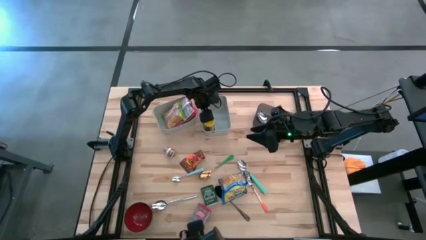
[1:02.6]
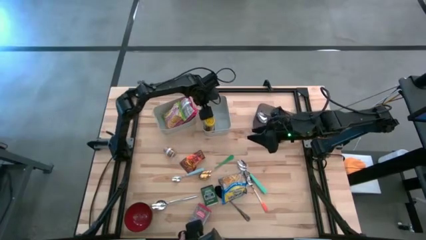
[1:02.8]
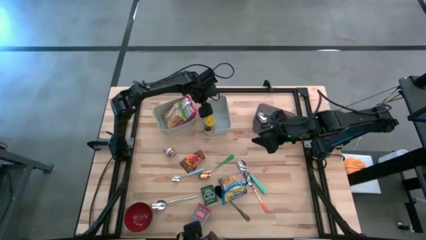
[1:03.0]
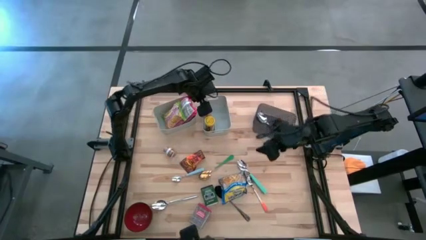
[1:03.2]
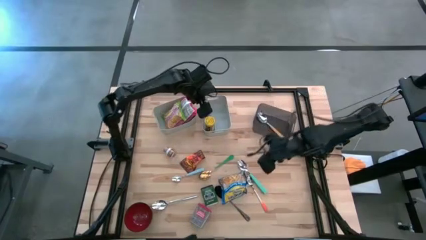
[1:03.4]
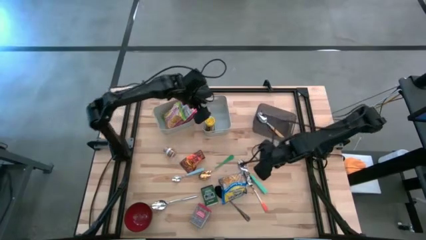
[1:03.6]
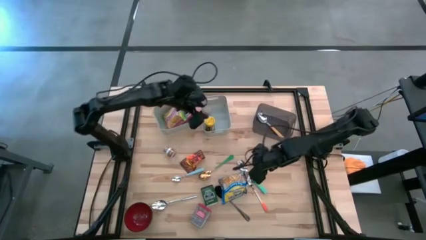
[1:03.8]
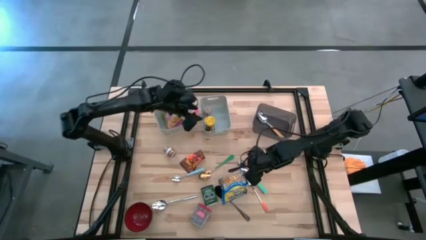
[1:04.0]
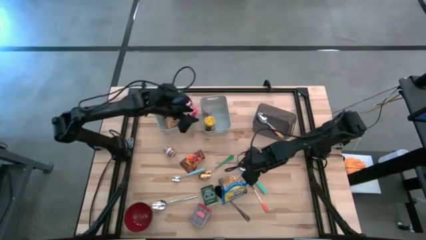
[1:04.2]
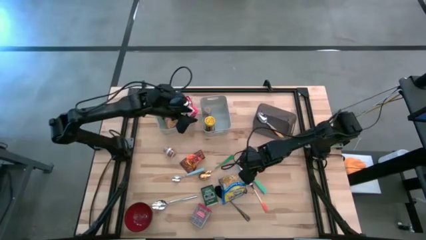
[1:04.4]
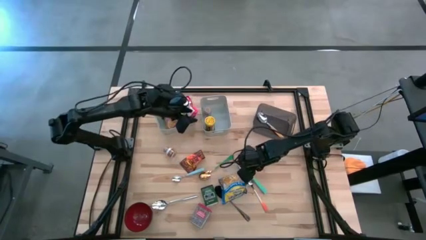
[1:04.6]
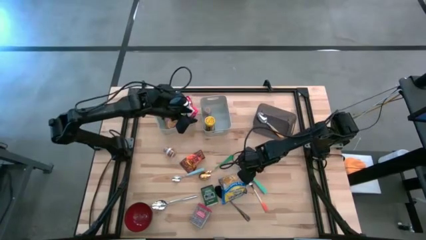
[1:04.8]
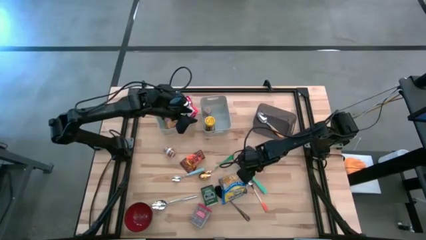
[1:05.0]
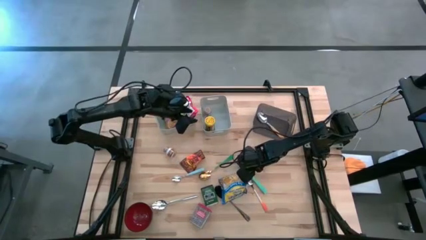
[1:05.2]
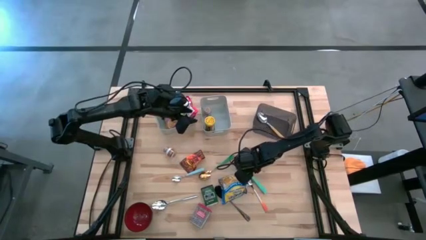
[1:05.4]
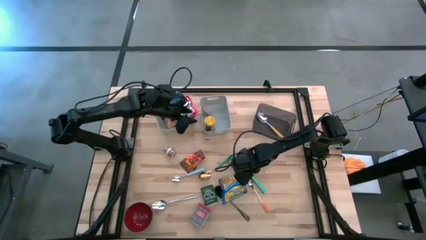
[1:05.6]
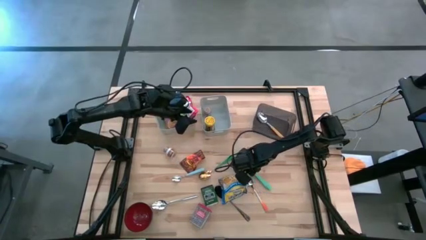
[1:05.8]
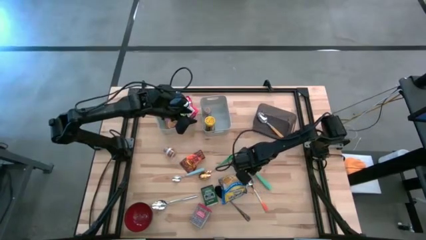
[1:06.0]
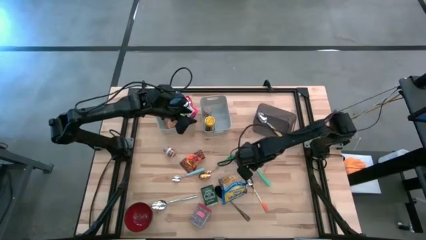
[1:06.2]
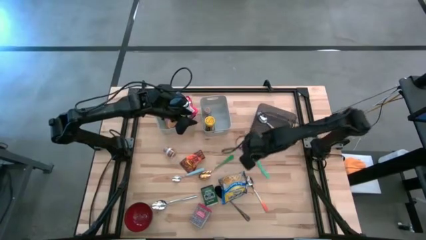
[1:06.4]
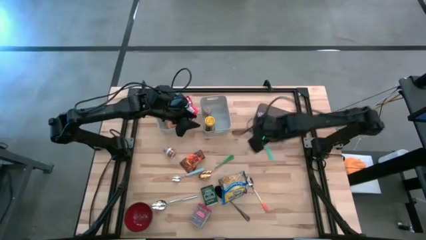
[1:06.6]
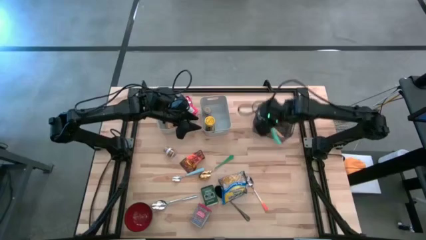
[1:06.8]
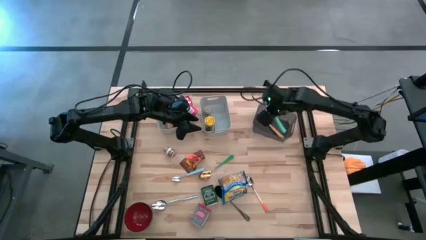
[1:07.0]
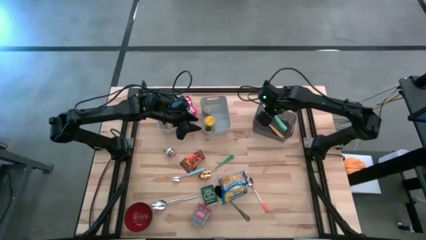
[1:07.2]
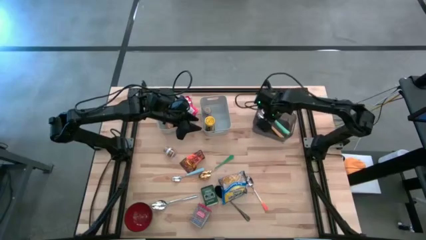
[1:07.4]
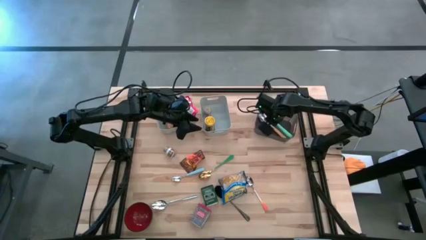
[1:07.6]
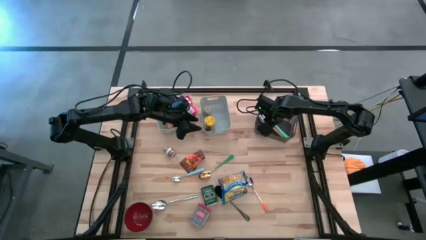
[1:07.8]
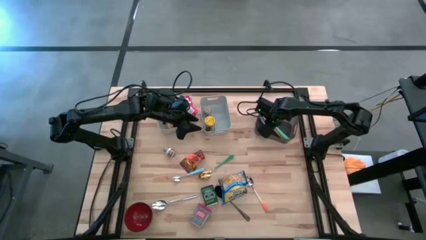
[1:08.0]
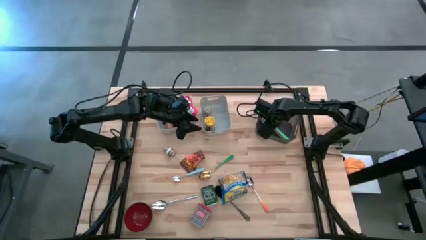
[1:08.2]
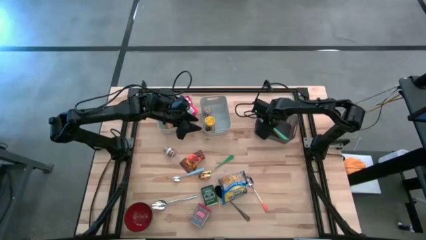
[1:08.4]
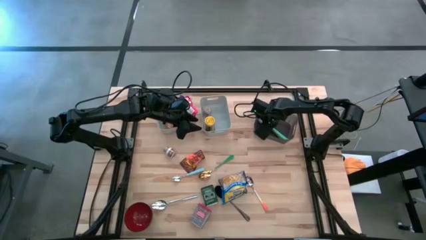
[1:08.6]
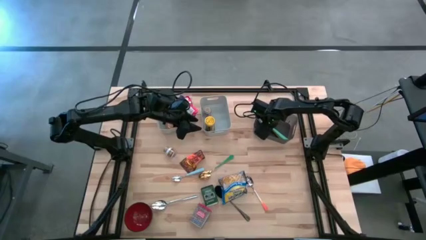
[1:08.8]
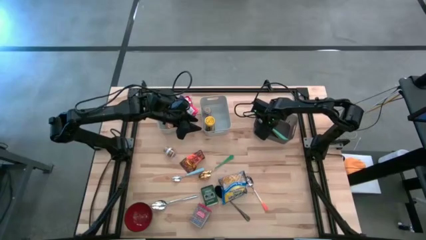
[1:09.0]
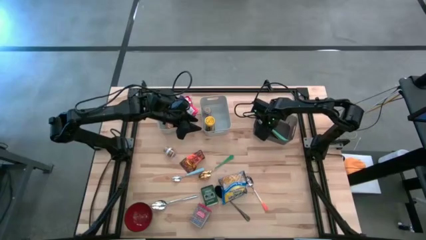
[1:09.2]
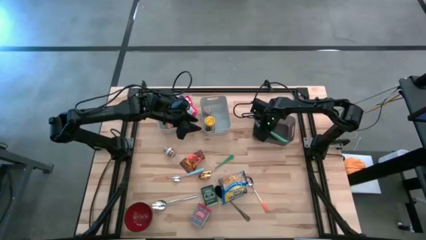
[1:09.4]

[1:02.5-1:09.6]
Put the right light blue spoon into the black bin

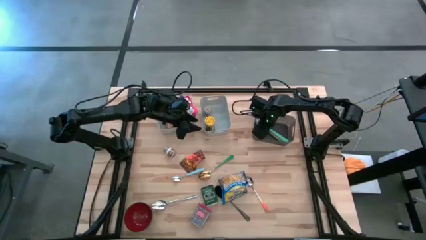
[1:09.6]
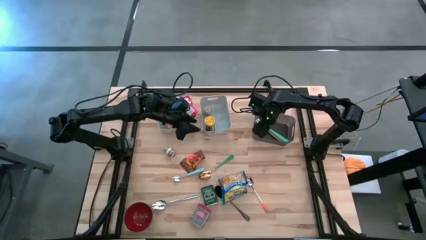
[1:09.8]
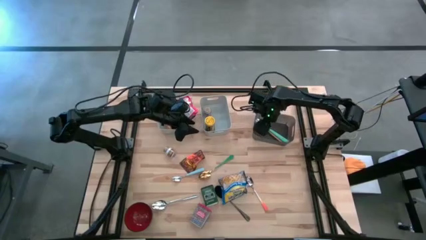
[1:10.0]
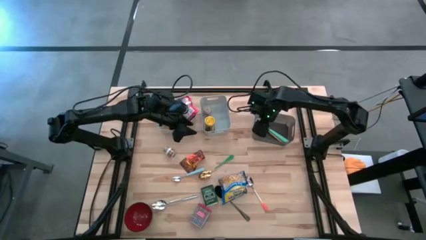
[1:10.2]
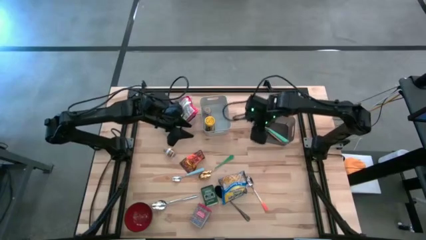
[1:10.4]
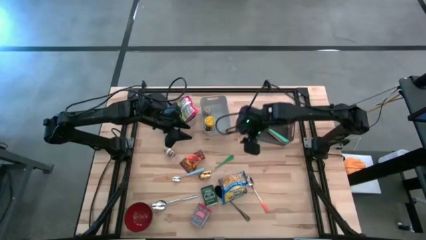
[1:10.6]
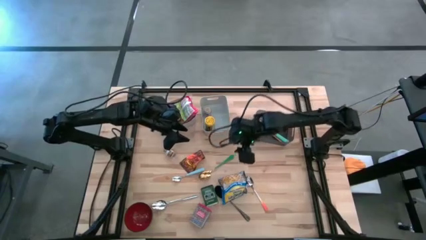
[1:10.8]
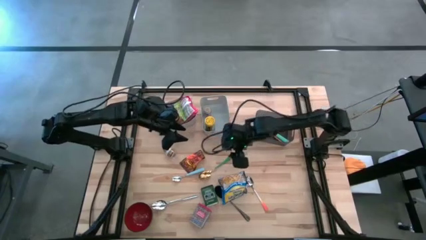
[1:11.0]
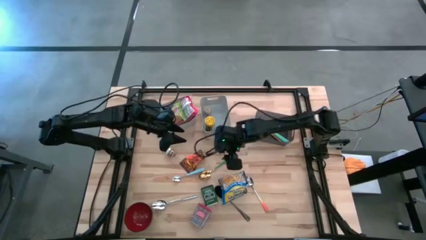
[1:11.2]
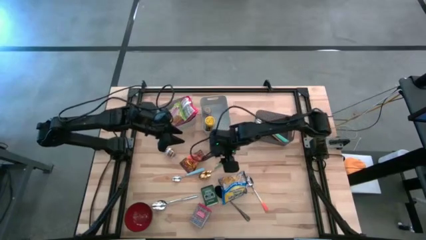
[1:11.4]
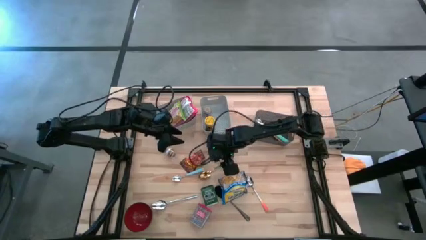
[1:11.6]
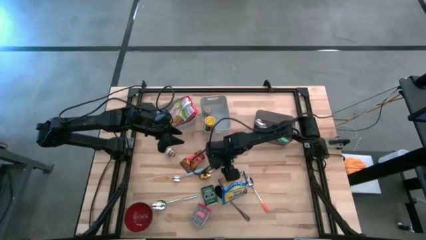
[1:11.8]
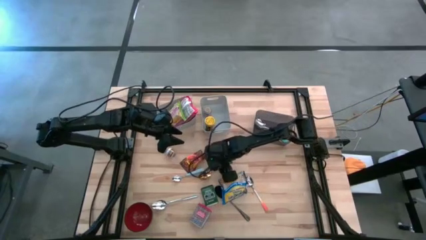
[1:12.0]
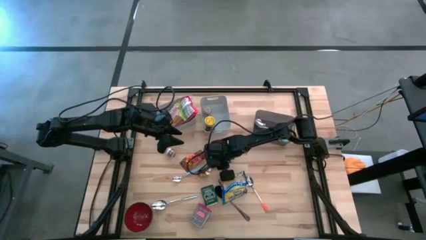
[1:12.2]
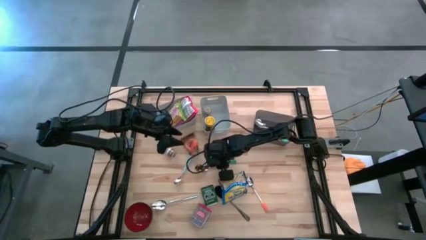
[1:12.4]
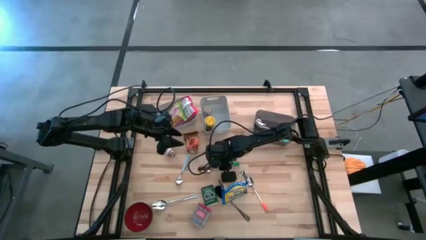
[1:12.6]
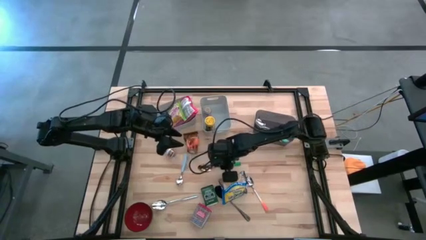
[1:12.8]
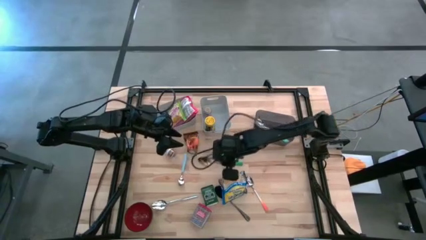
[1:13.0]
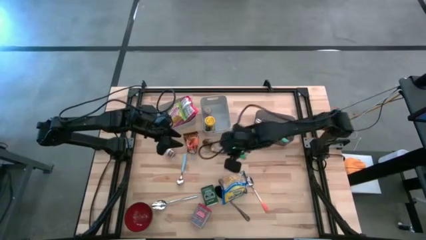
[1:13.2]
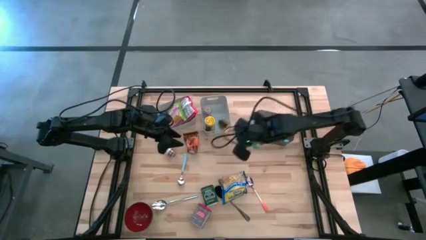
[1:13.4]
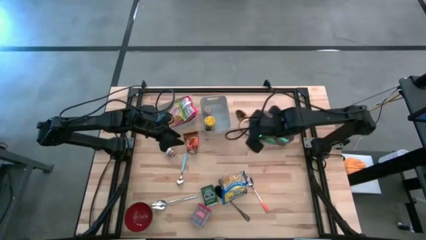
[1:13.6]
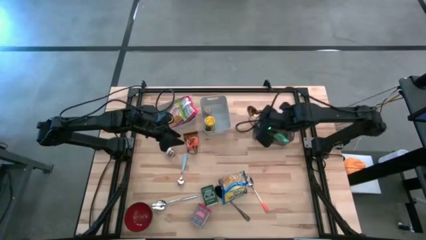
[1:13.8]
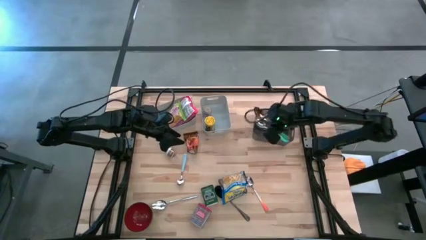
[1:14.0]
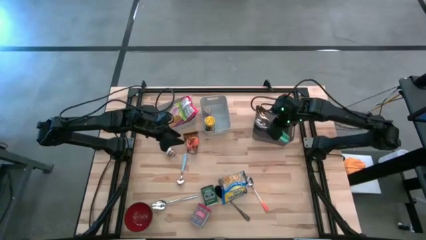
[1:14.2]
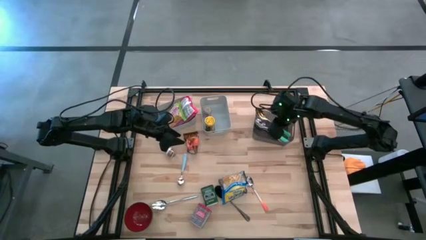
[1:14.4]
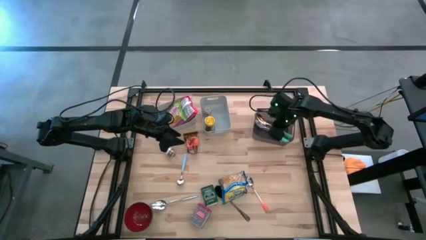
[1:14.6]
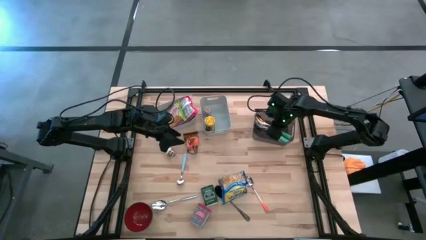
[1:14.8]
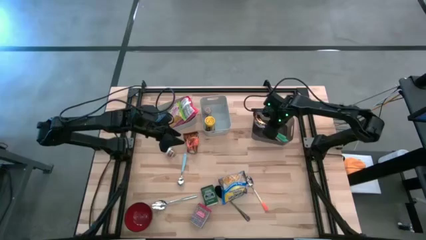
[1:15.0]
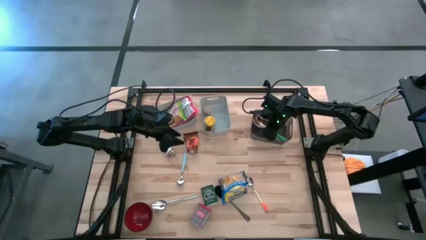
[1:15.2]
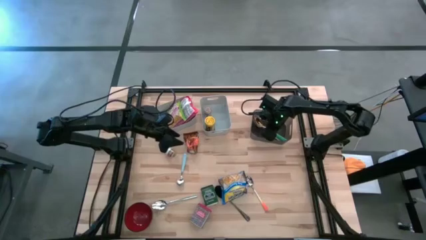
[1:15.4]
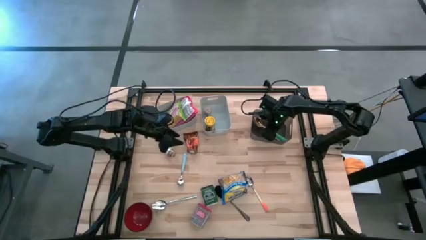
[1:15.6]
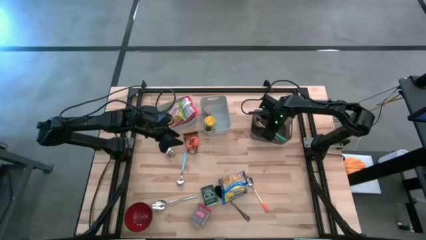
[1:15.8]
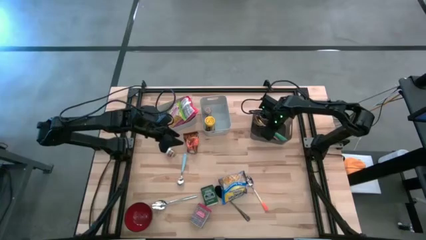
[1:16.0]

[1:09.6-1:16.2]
Put the dark green spoon into the black bin
